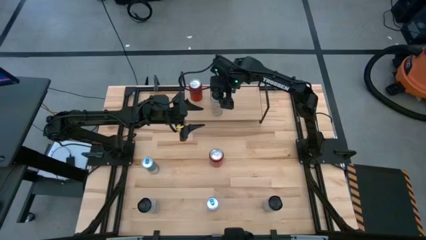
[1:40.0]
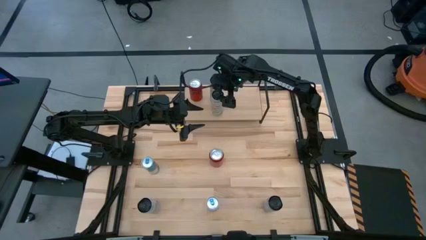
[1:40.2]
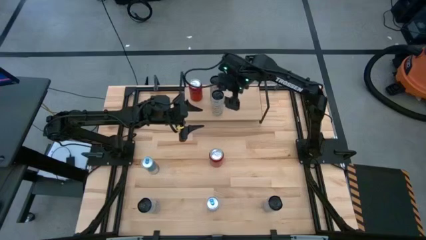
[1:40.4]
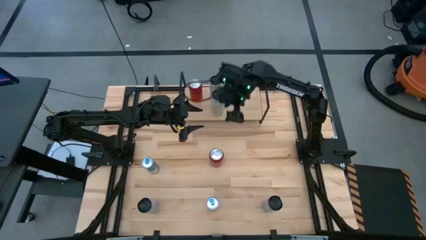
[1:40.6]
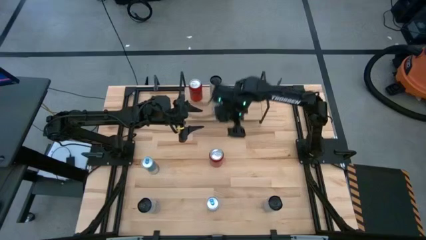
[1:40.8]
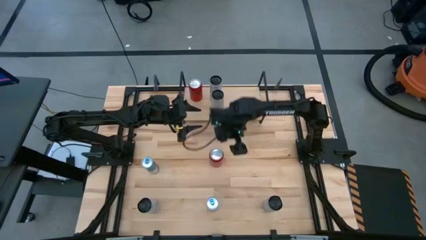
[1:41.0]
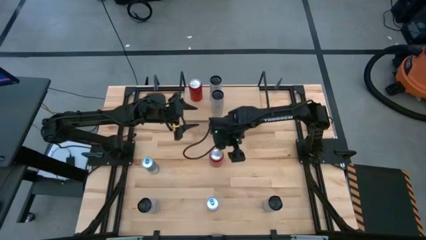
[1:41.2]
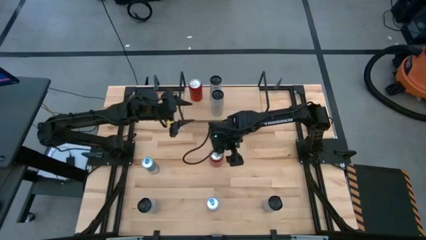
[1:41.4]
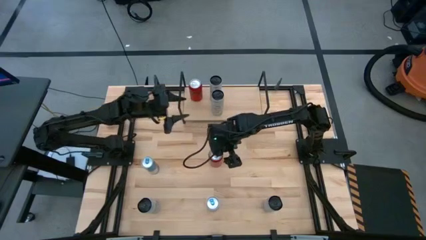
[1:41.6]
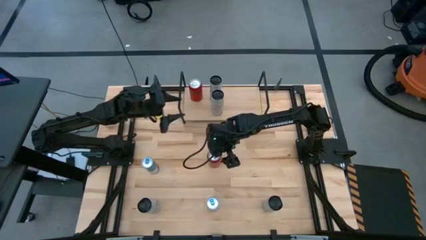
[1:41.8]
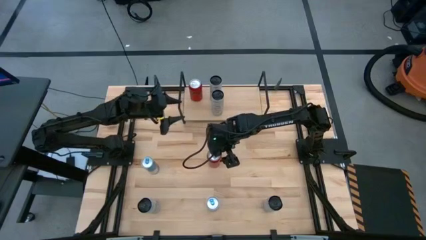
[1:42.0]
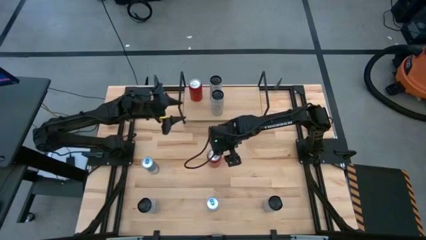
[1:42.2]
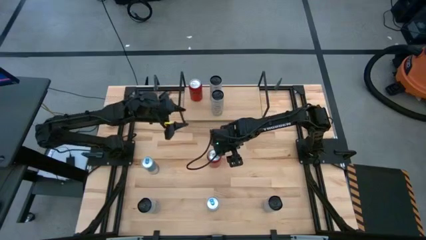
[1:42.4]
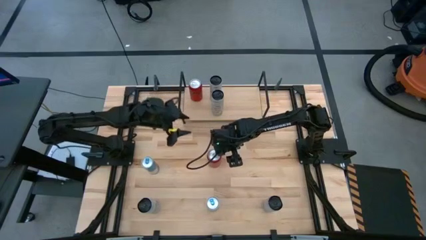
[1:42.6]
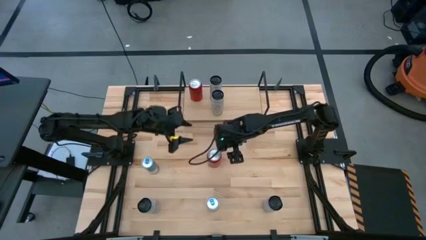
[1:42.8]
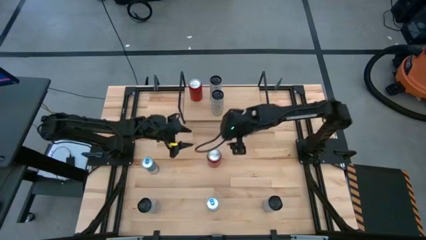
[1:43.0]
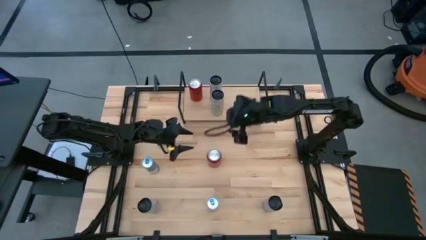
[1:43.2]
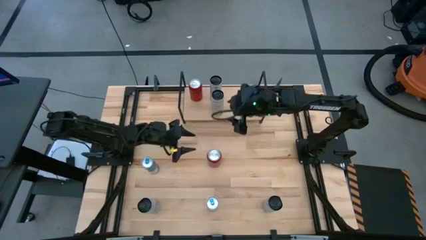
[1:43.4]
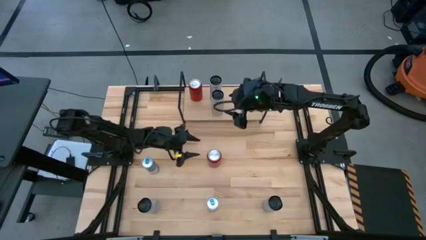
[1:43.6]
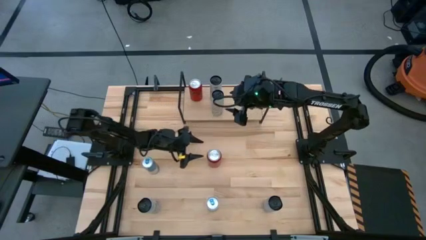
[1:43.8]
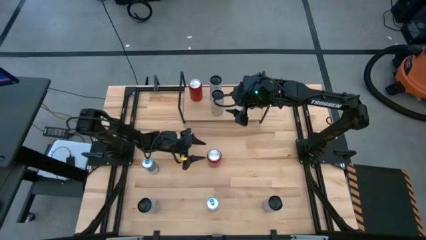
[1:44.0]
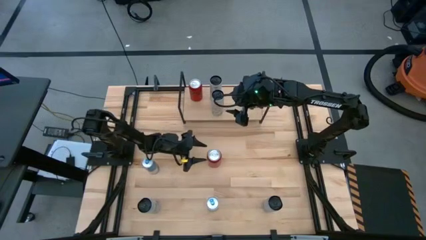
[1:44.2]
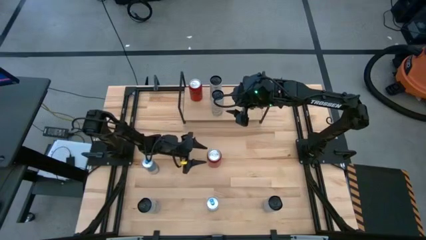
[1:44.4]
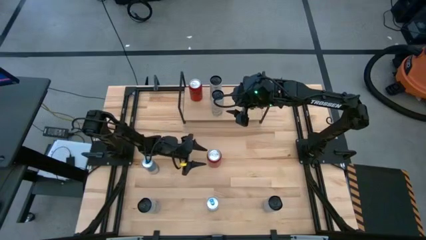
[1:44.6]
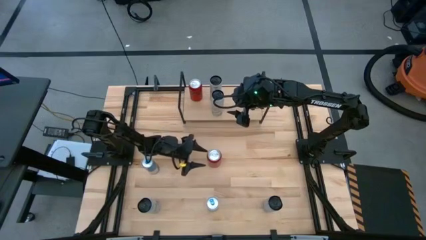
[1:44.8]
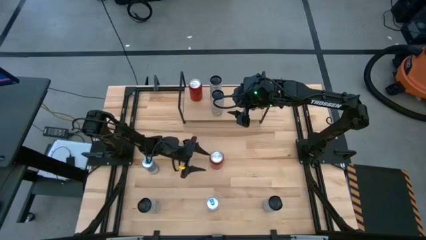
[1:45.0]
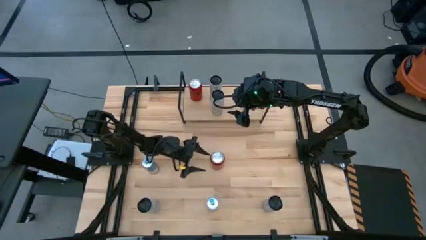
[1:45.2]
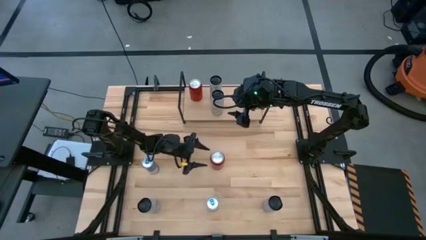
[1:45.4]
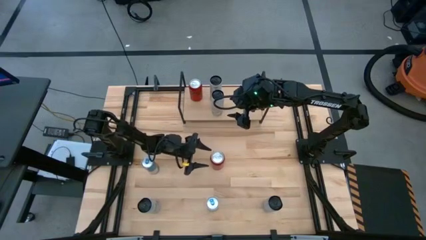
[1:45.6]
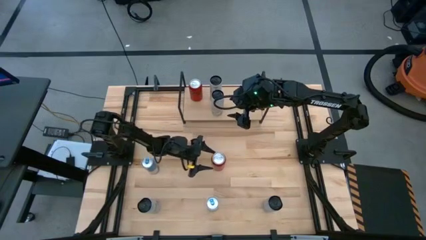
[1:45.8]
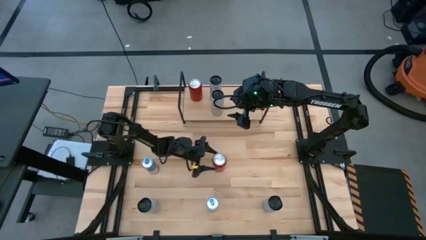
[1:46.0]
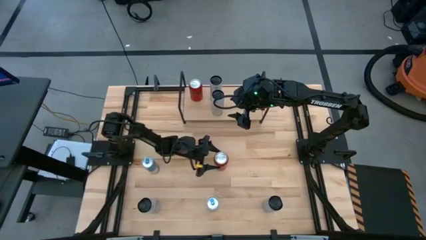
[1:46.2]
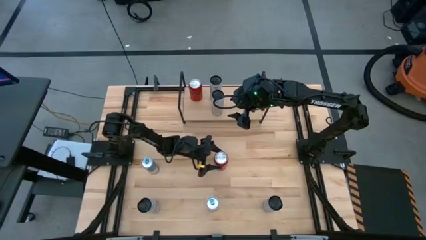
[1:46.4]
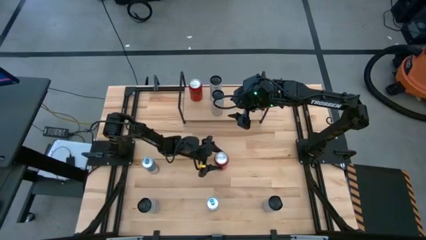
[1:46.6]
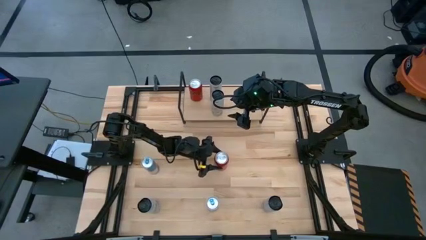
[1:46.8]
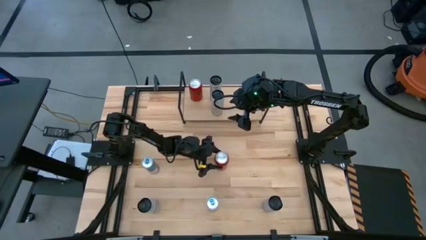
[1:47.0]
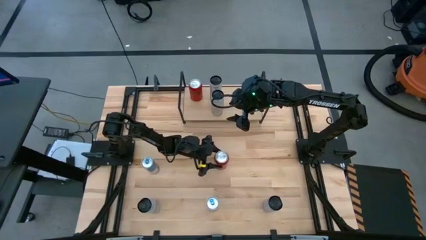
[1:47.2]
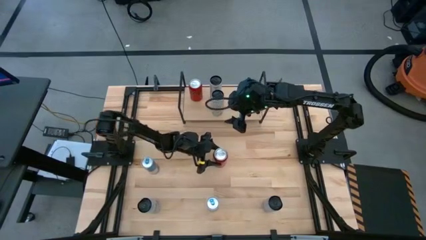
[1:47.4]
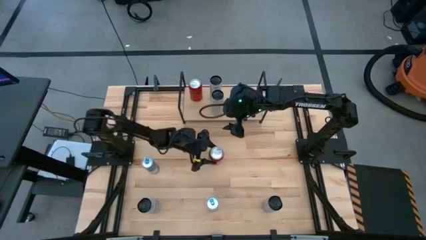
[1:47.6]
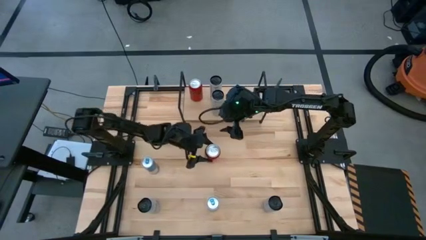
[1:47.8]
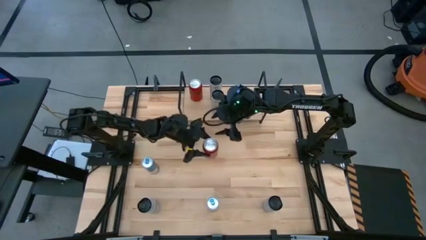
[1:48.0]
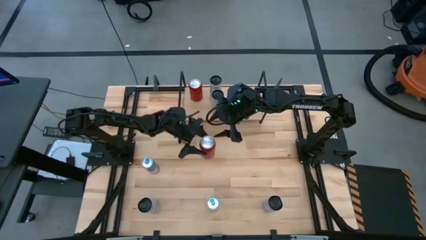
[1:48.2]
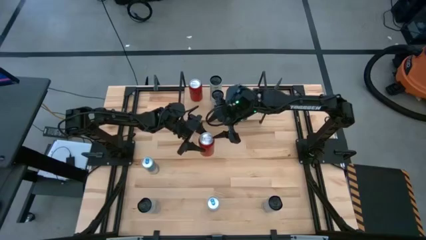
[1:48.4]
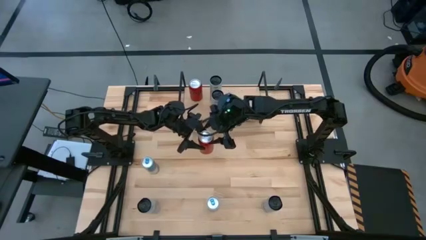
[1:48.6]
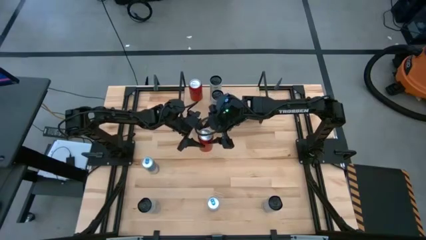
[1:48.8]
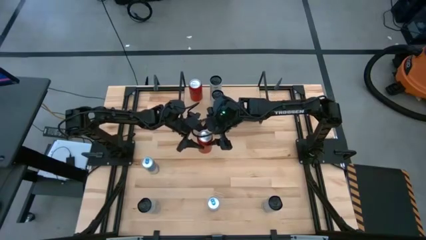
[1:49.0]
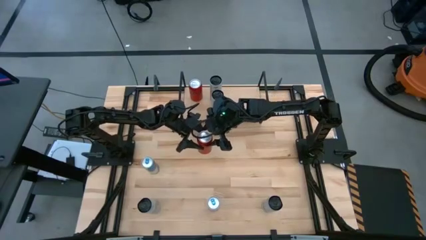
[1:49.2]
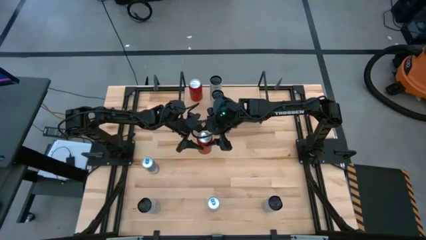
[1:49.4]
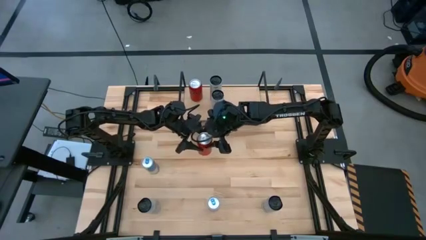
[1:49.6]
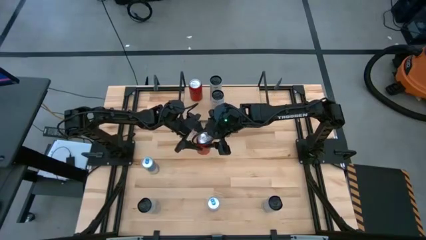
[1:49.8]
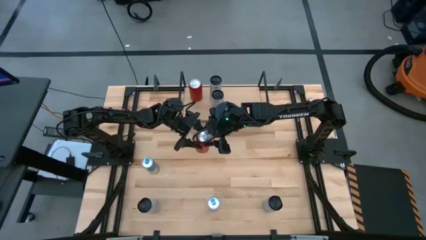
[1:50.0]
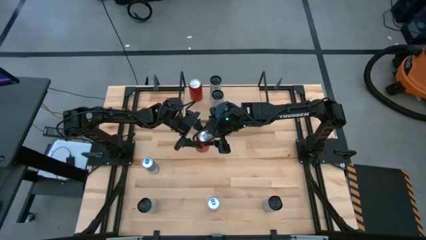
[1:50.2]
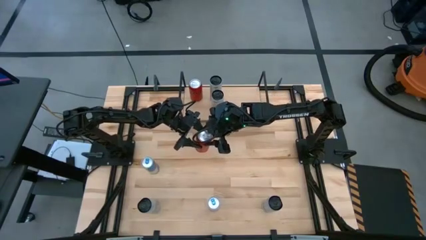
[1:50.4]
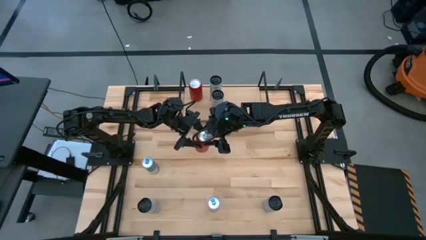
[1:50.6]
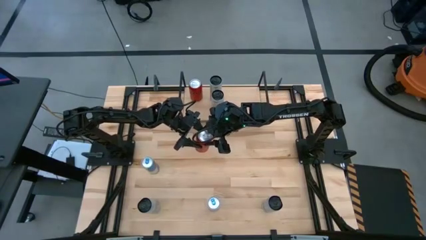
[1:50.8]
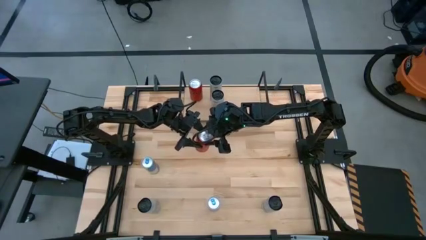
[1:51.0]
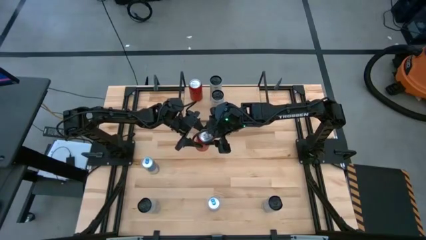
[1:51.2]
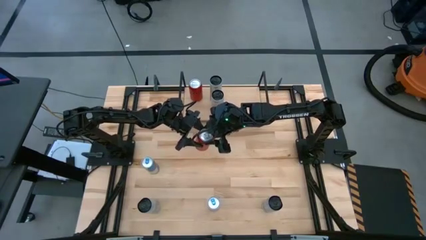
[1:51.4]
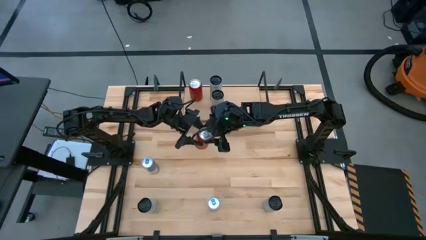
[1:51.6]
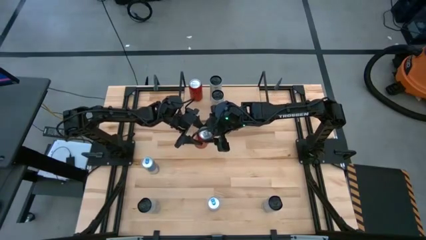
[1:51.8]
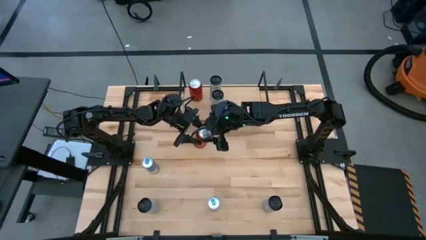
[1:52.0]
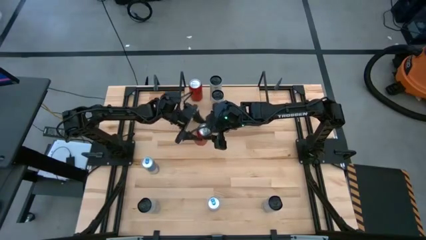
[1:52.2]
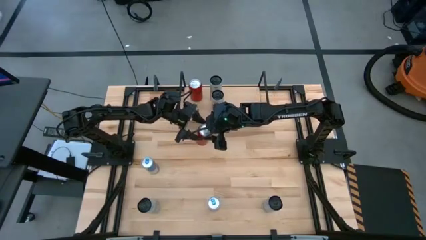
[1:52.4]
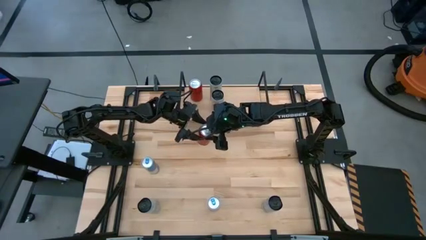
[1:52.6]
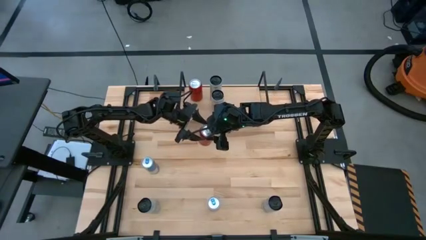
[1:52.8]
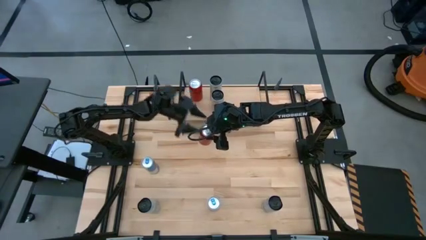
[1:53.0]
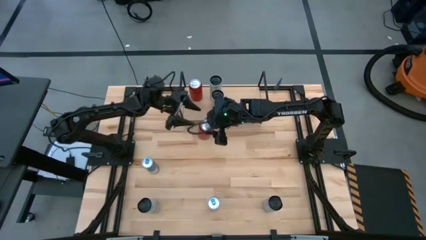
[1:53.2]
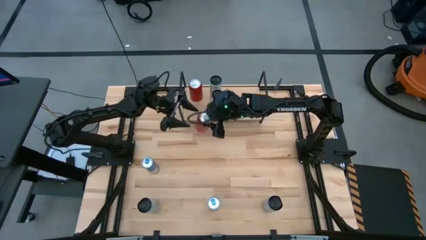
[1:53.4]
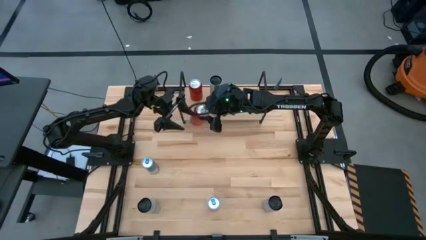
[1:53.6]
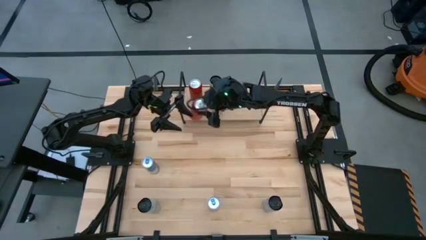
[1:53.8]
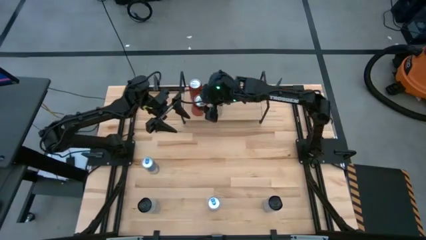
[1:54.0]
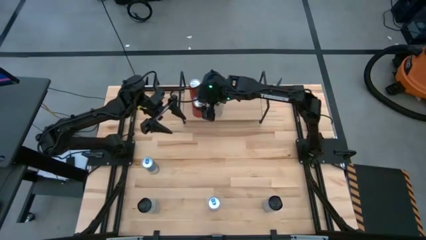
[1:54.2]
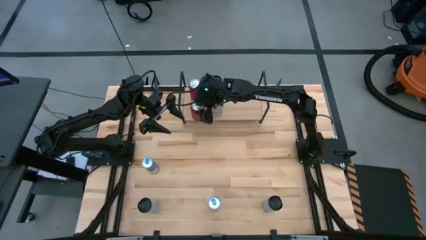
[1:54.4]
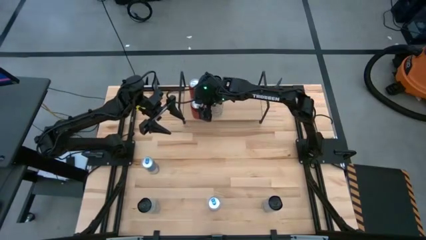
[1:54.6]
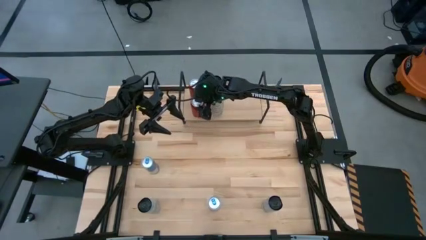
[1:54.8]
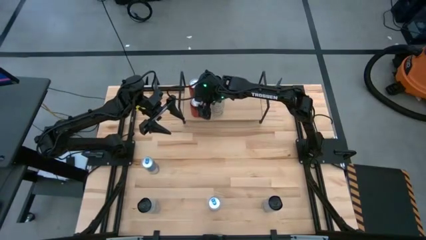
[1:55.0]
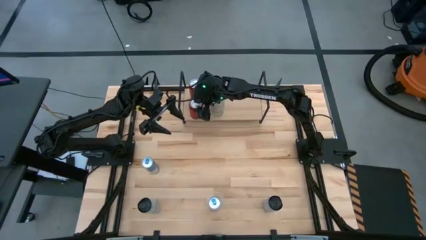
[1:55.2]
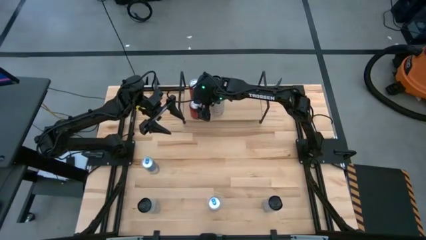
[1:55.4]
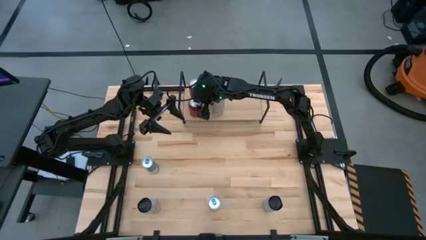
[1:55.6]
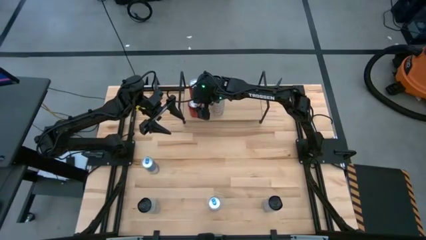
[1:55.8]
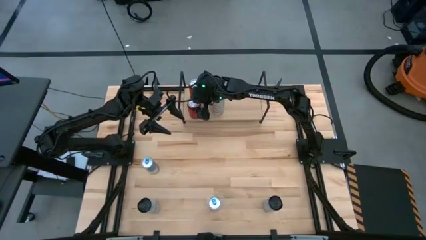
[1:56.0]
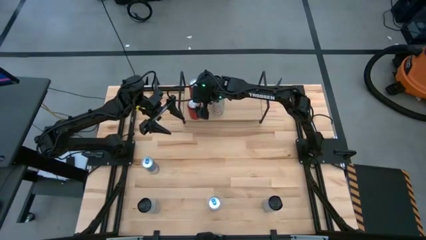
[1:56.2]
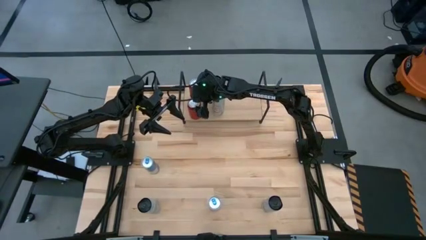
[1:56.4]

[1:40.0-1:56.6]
Task: Place canned beverage on shelf
Put the red black soda can aligned with the other red black soda can on the shelf

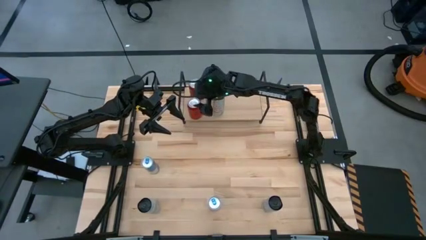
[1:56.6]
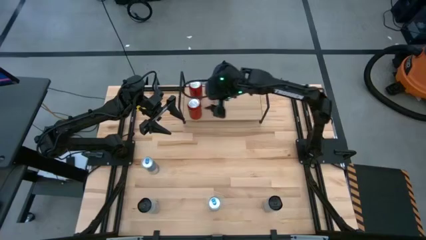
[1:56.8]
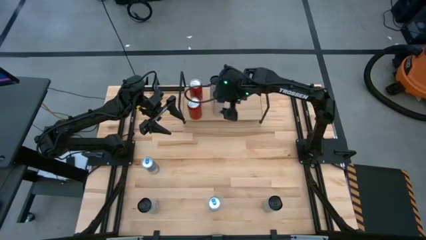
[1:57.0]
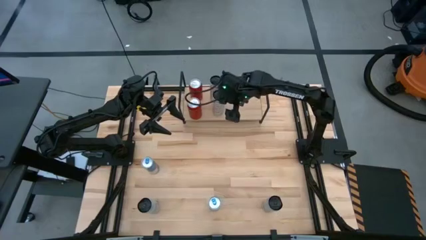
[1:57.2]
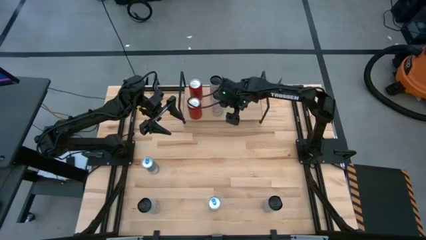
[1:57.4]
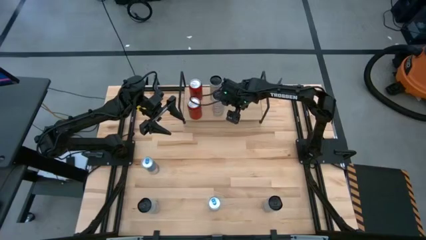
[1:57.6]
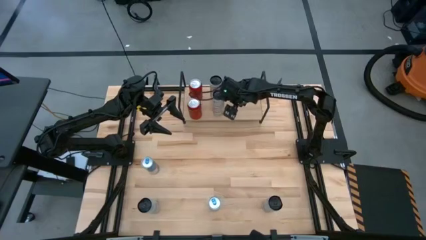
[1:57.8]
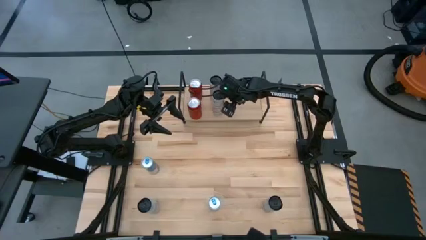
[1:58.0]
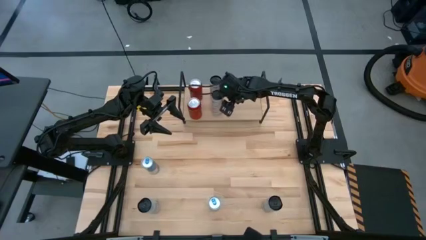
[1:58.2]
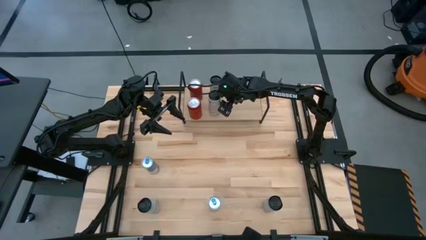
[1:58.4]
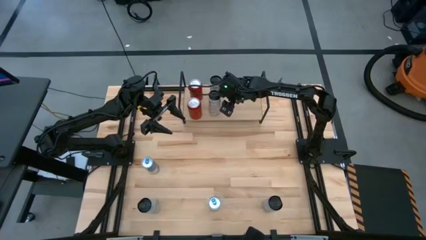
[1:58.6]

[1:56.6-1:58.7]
Adjust the white yellow soda can
